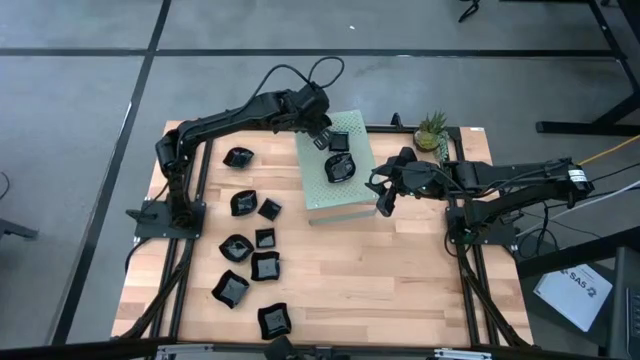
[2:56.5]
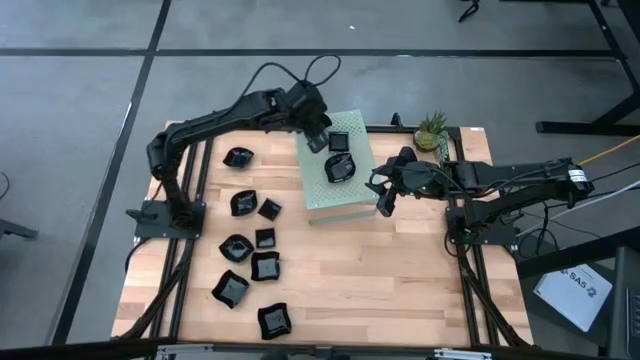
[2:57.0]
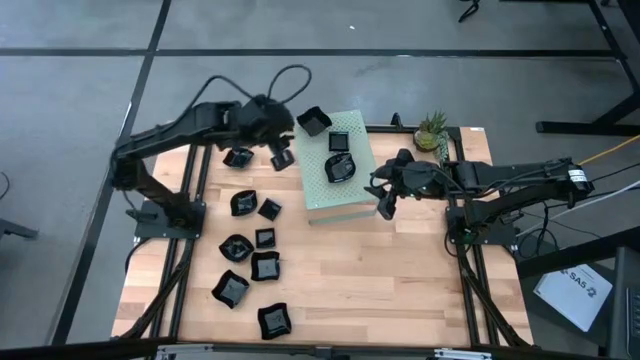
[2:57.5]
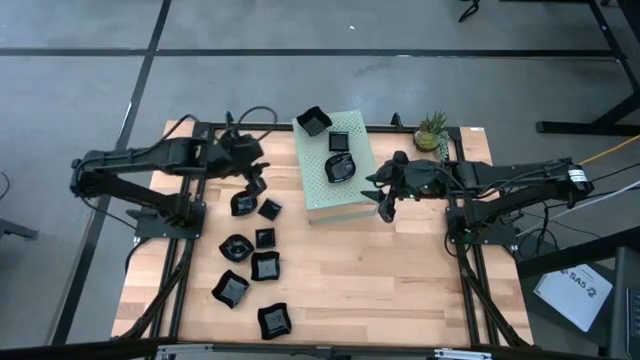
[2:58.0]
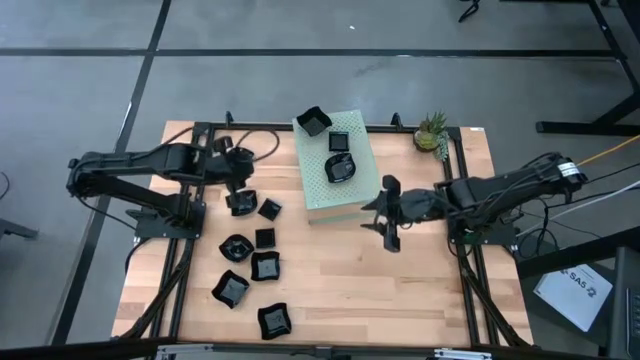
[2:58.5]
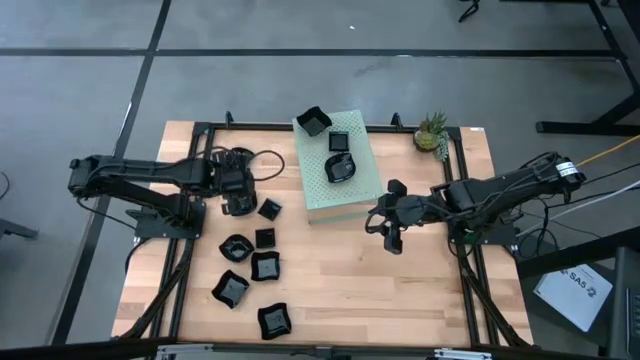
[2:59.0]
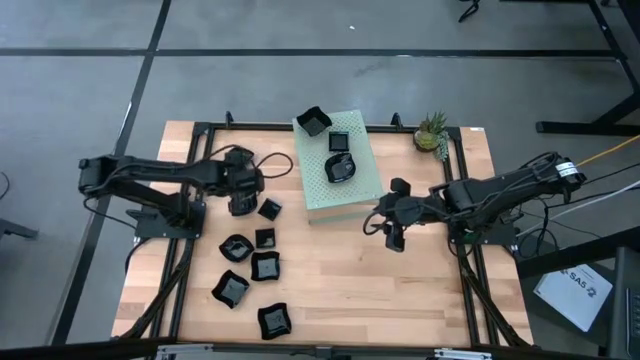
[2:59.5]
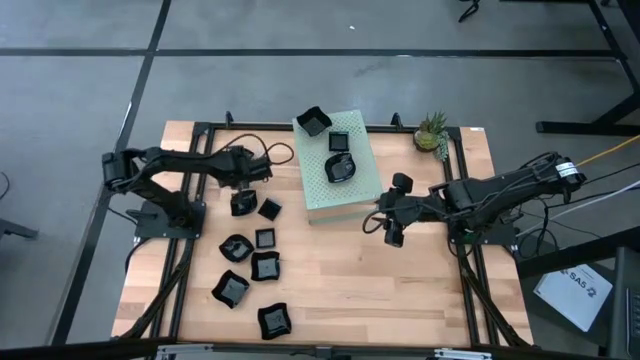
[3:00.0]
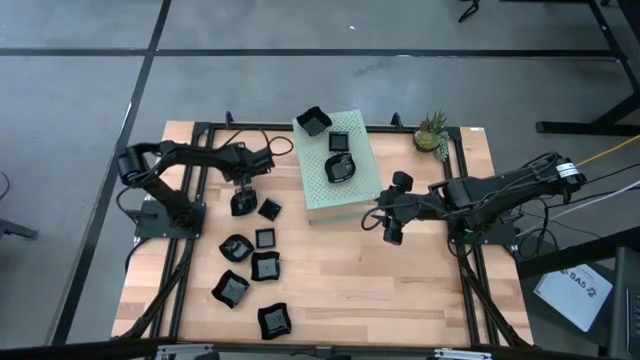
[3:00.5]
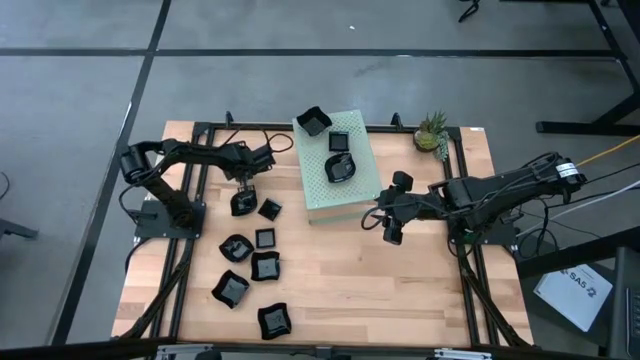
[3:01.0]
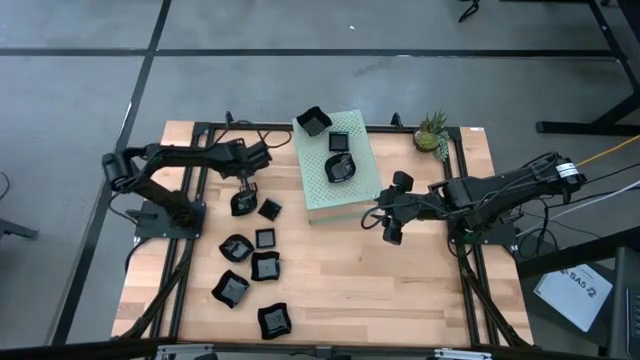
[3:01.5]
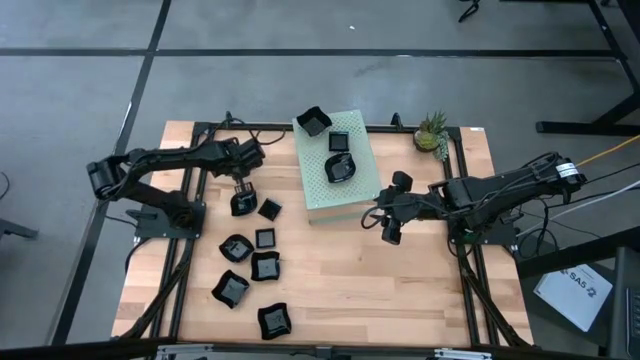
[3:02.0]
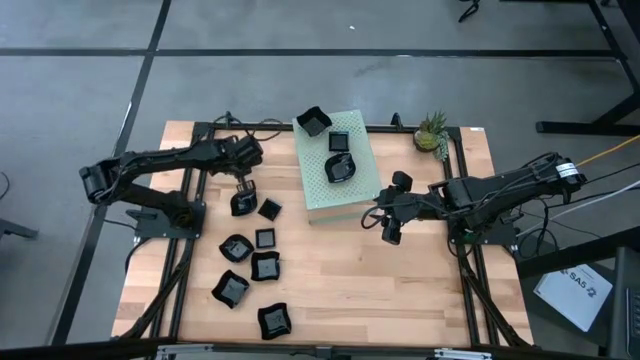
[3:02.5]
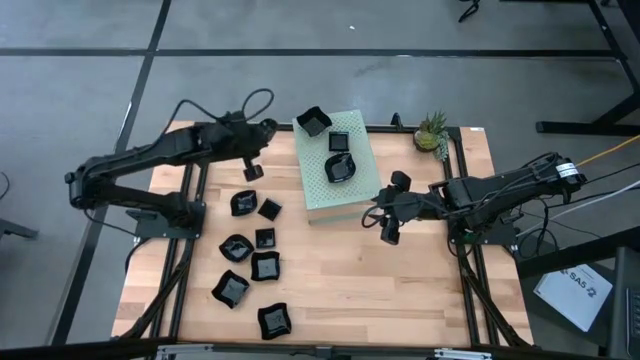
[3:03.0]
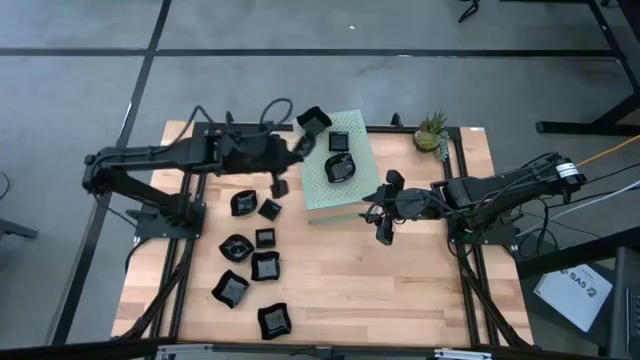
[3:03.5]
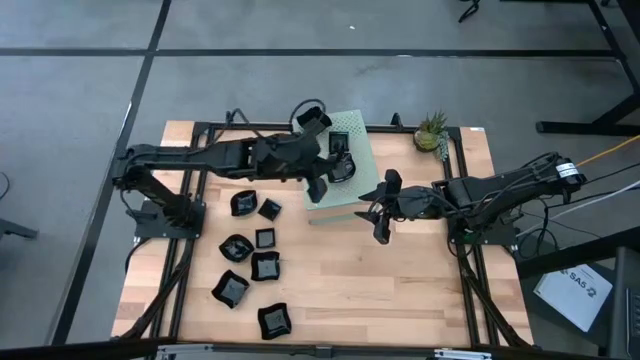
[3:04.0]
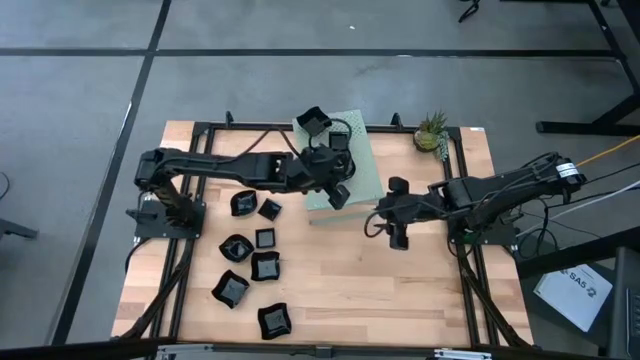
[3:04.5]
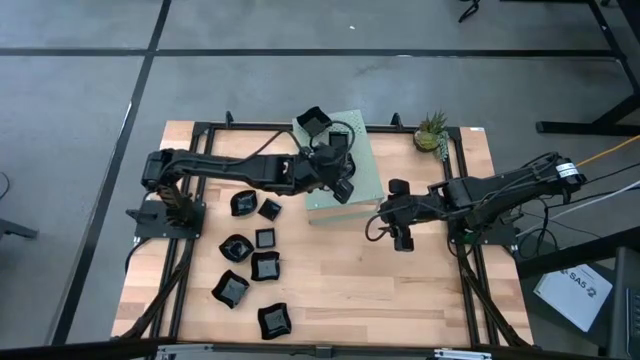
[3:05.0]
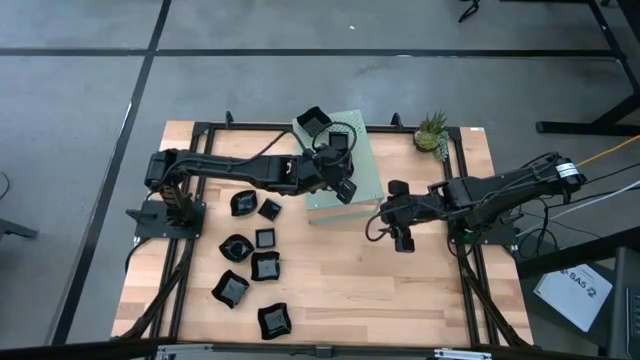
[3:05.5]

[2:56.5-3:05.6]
Task: Pick & Place Mini shaped plates
Stack the black leaf shaped plate on top of the black leaf shape plates on the shelf

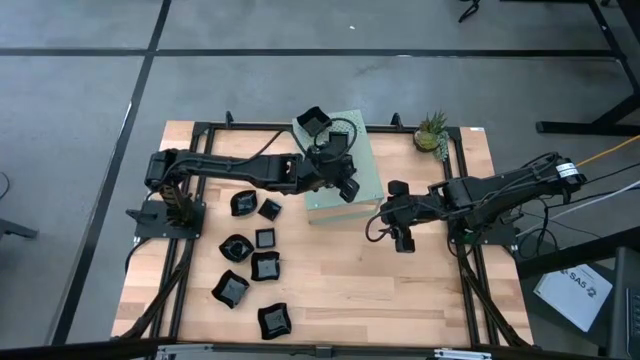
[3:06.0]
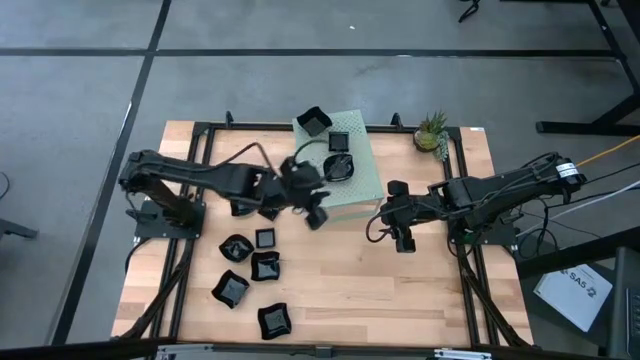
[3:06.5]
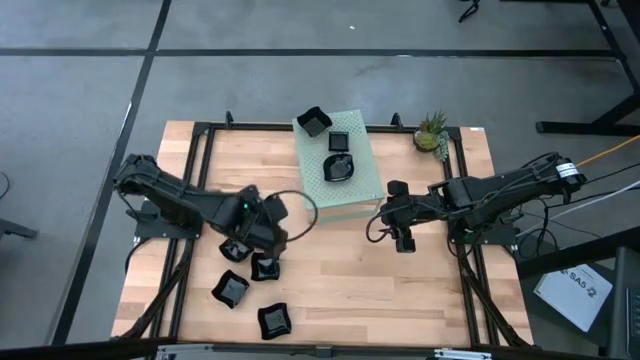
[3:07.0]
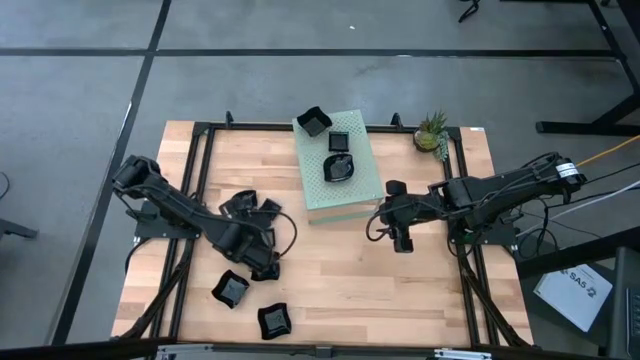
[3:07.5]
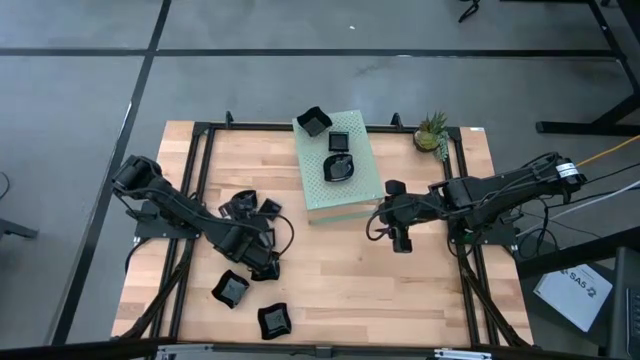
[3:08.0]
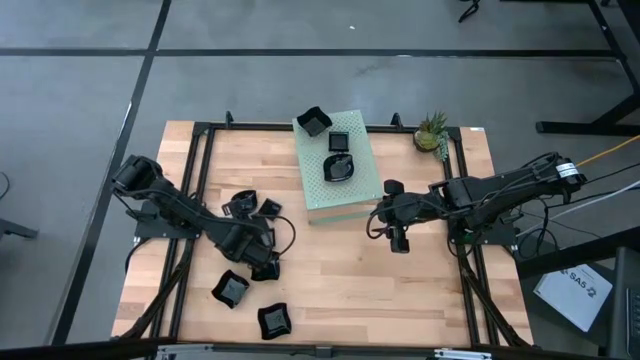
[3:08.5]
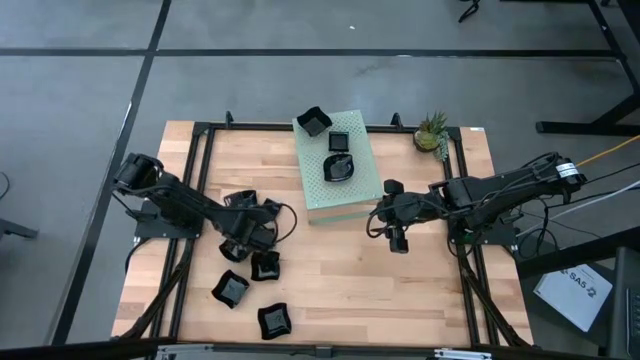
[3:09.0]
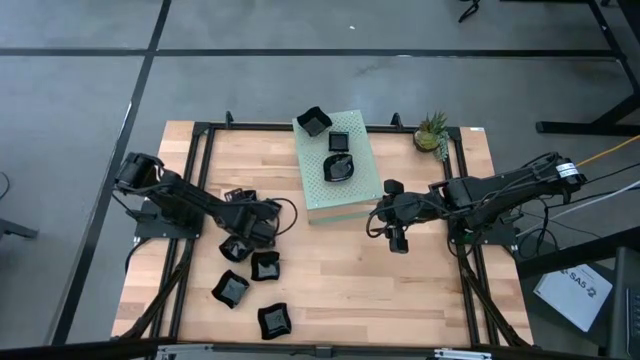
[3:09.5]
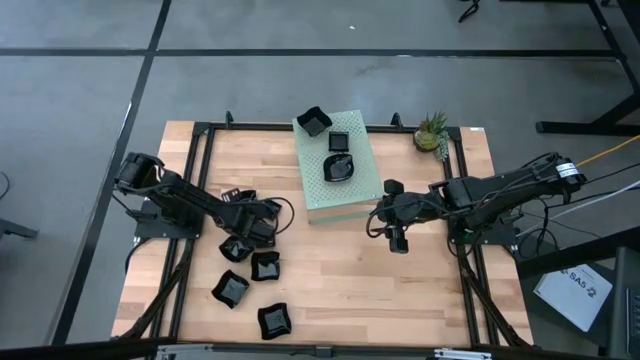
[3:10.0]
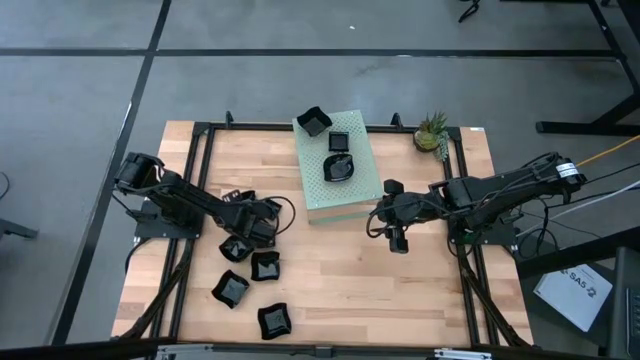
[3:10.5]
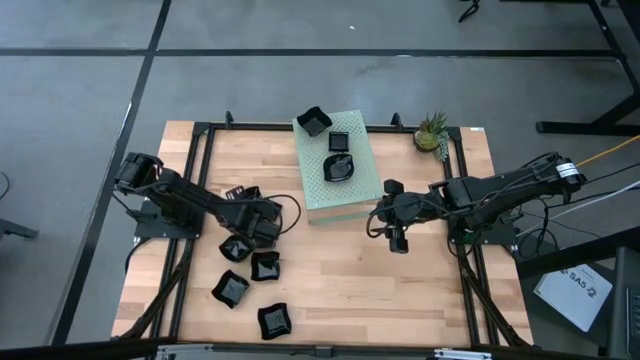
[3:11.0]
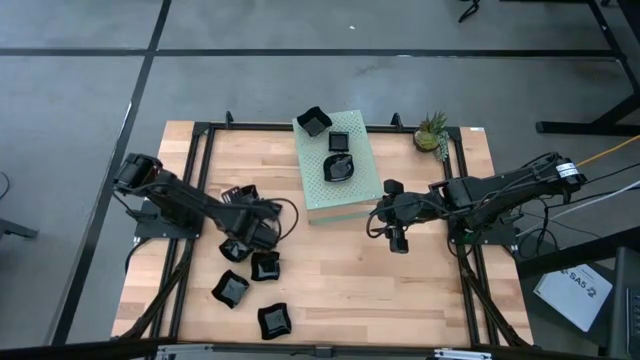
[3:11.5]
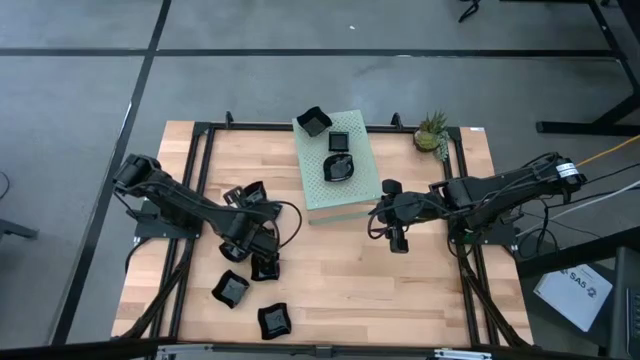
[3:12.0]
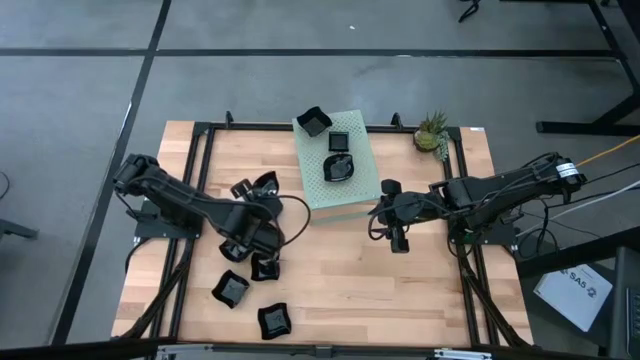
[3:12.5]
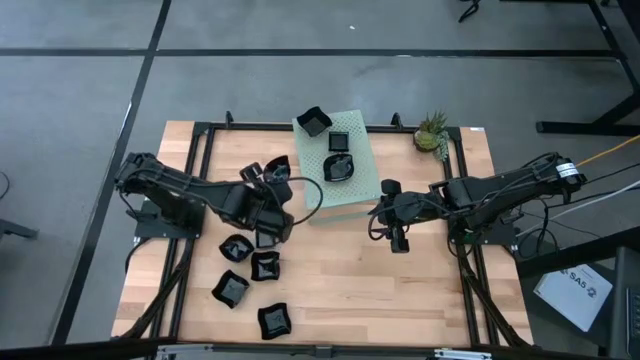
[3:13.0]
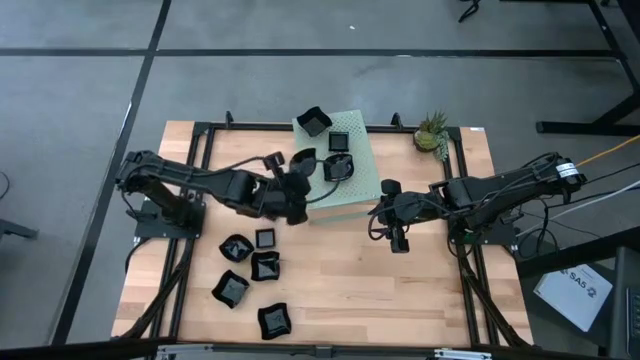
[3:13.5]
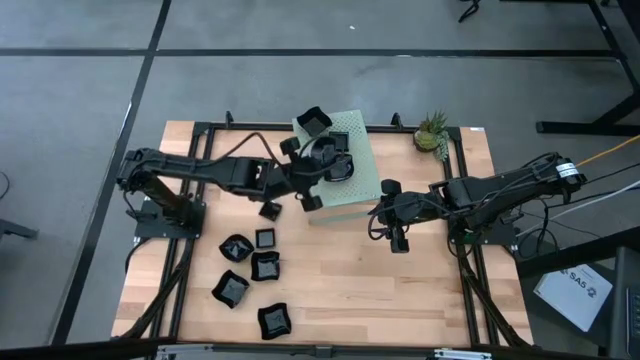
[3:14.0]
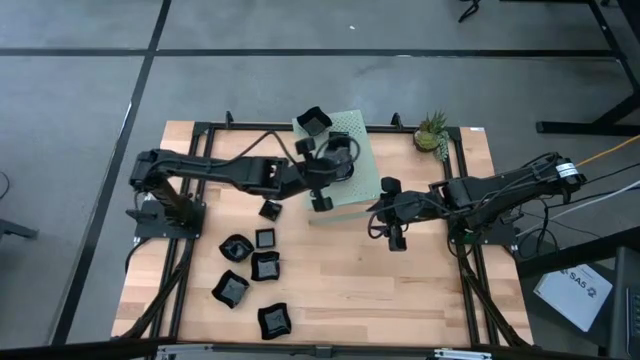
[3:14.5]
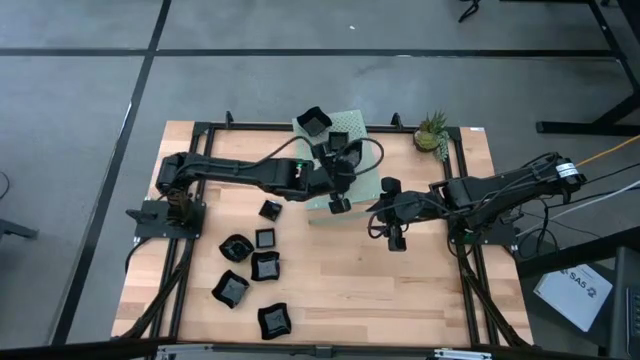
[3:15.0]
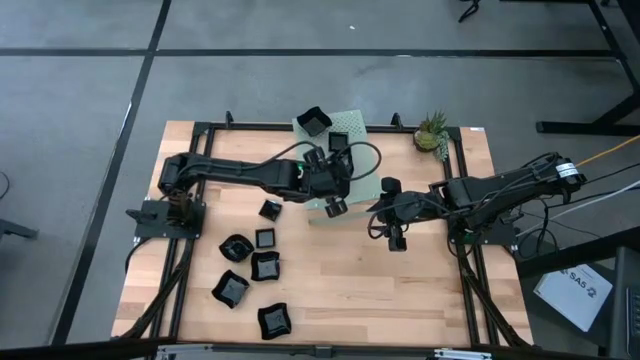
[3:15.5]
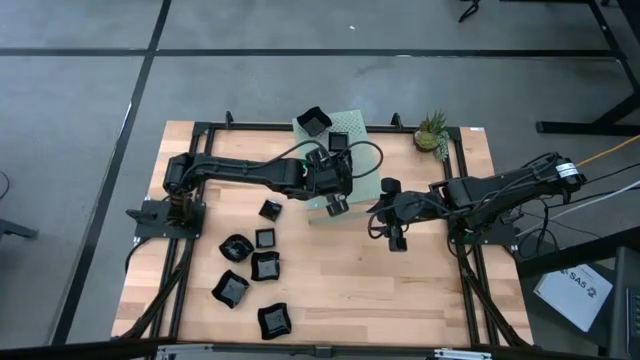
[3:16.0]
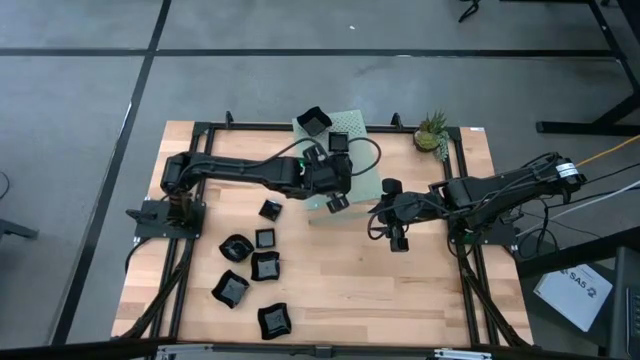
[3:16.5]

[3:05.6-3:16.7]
Stack the black leaf shaped plate on top of the black leaf shape plates on the shelf
